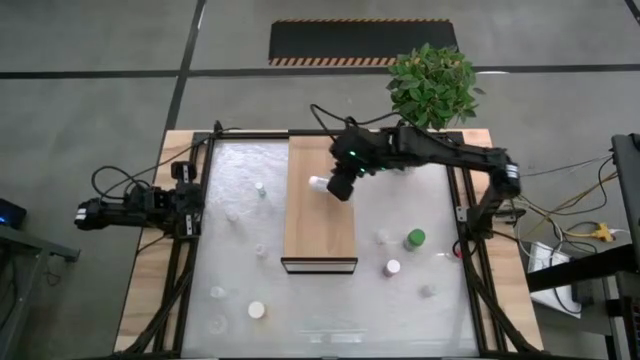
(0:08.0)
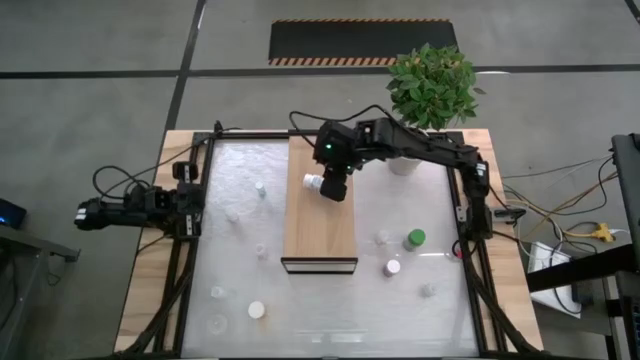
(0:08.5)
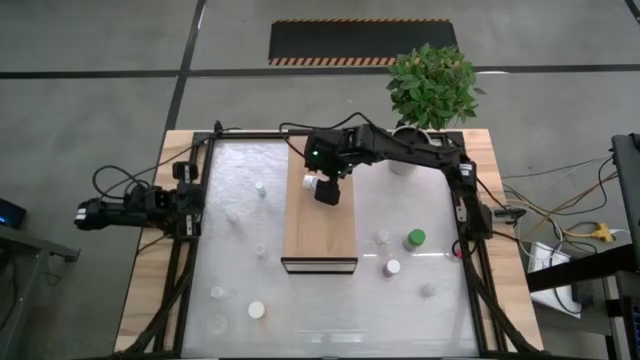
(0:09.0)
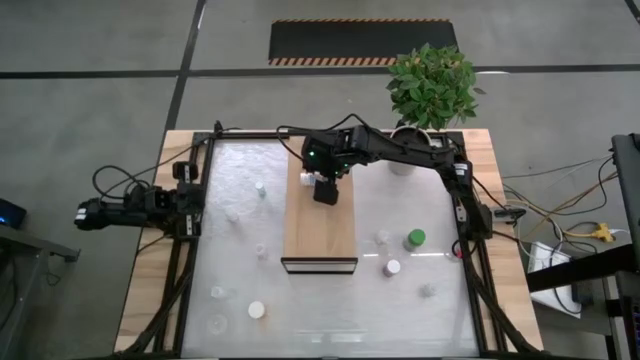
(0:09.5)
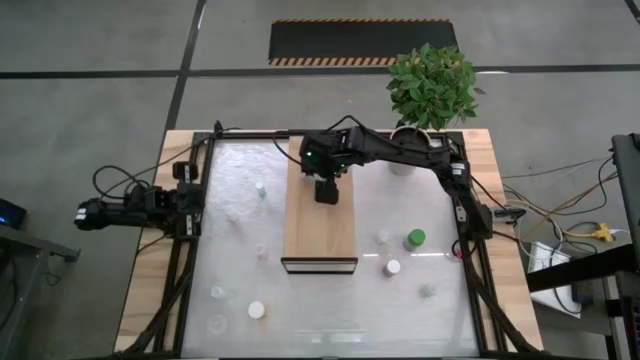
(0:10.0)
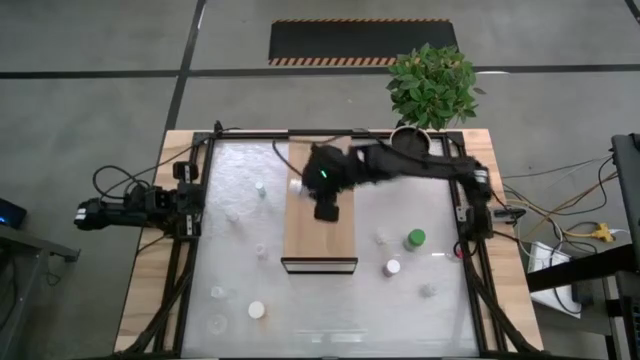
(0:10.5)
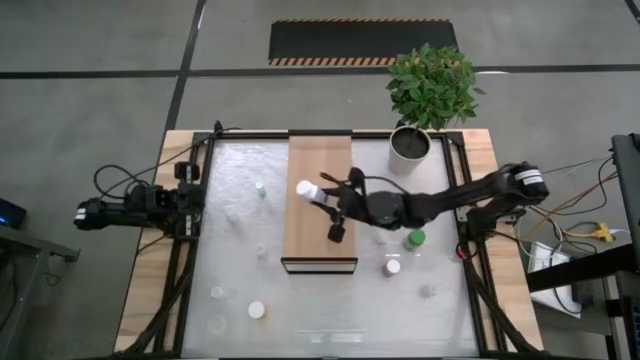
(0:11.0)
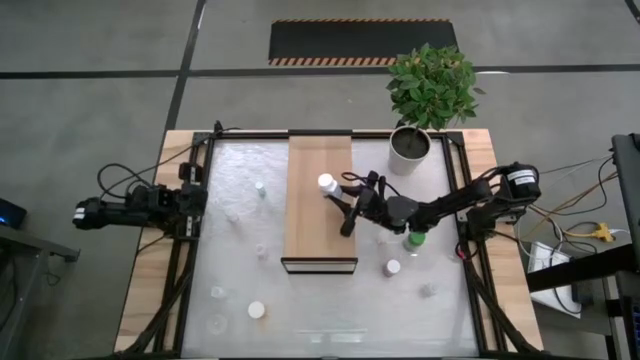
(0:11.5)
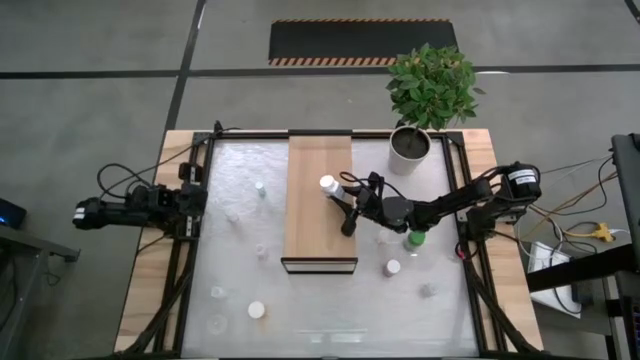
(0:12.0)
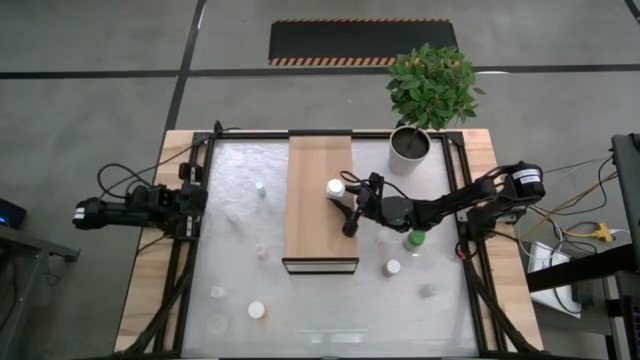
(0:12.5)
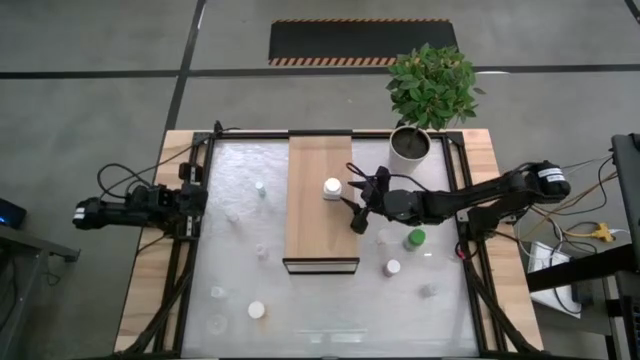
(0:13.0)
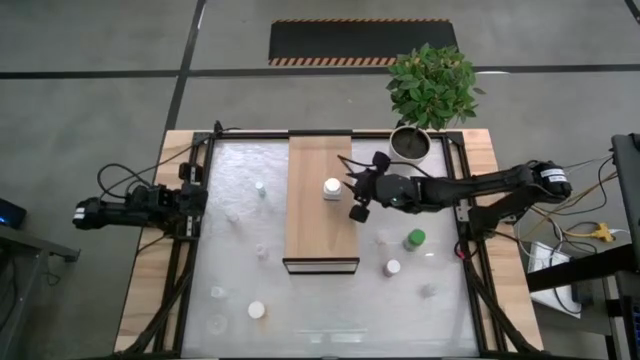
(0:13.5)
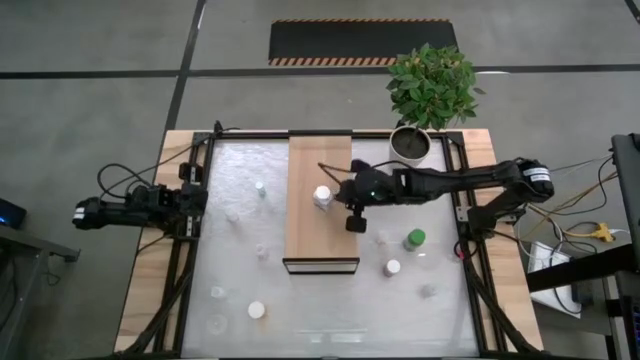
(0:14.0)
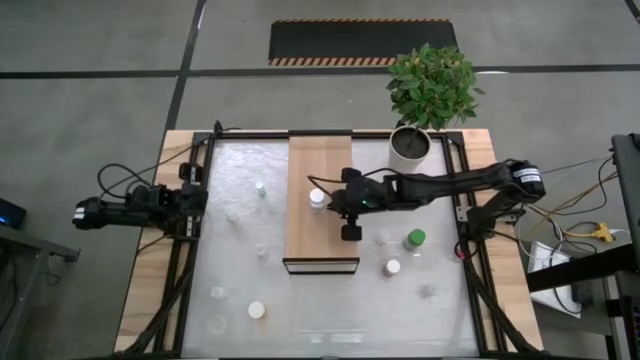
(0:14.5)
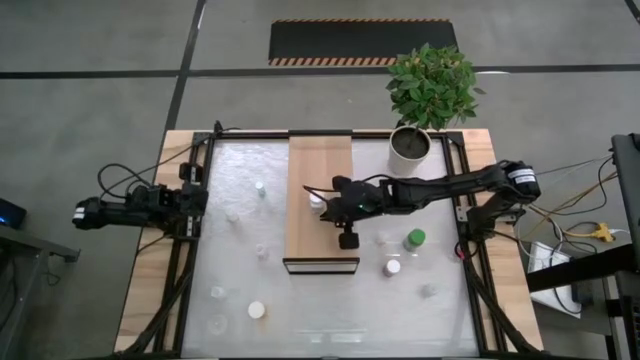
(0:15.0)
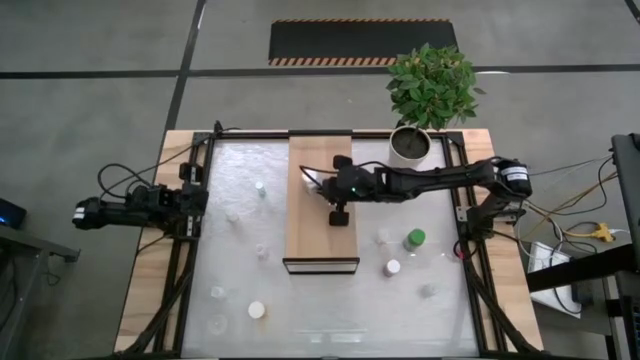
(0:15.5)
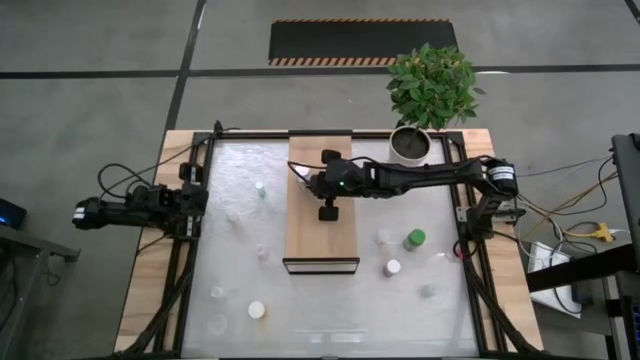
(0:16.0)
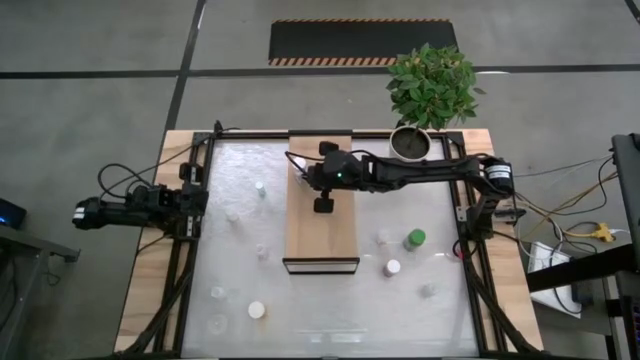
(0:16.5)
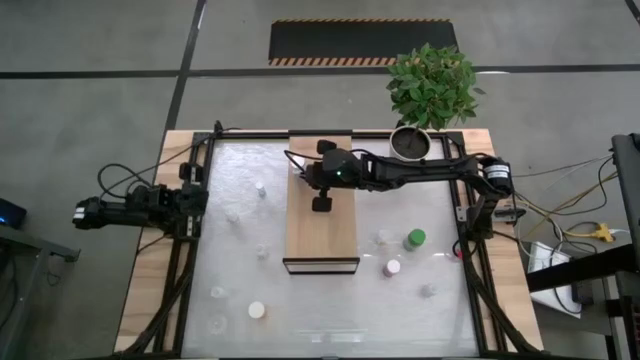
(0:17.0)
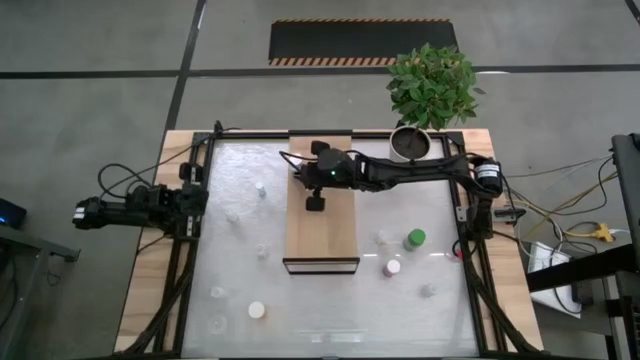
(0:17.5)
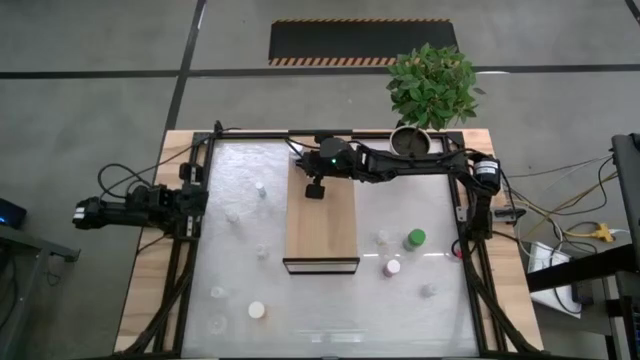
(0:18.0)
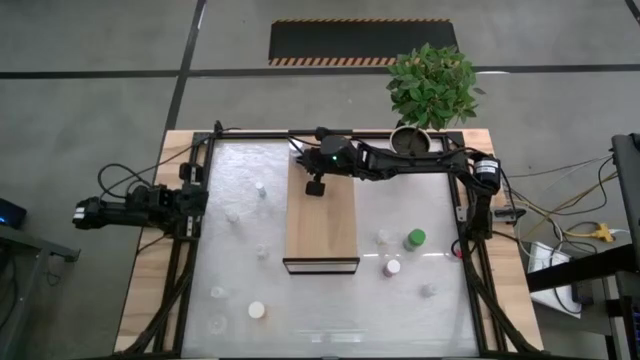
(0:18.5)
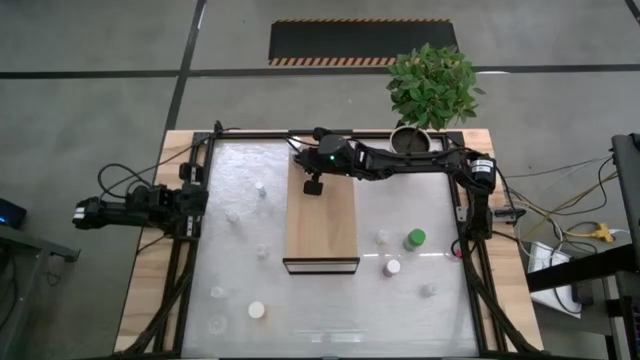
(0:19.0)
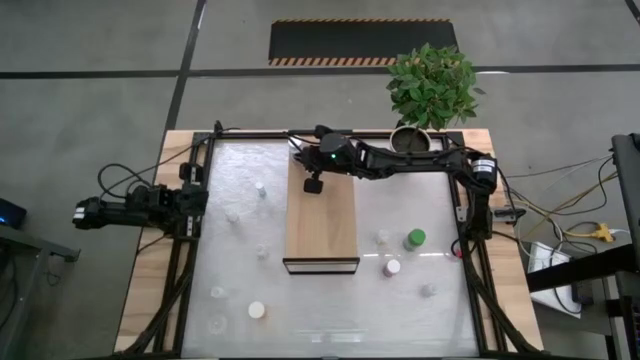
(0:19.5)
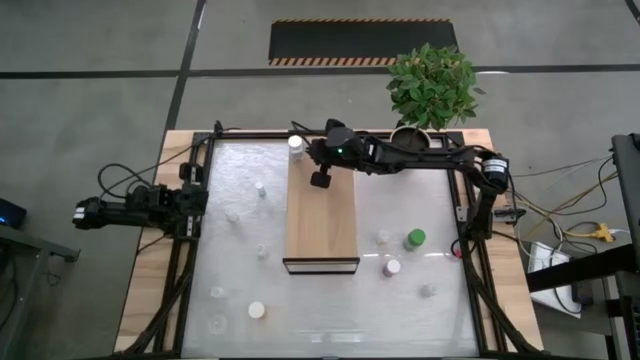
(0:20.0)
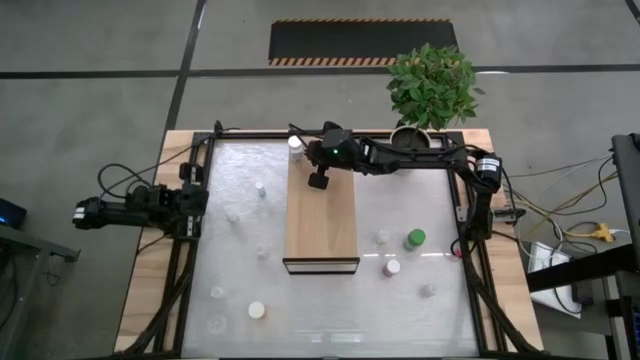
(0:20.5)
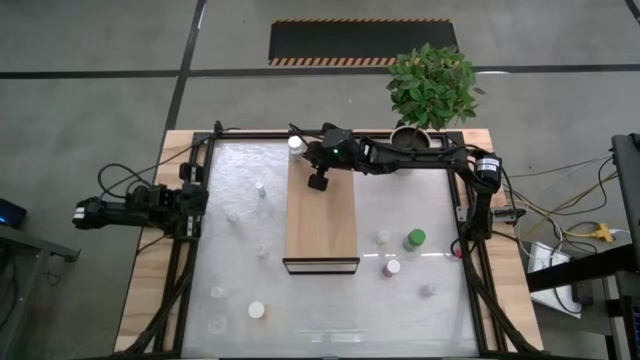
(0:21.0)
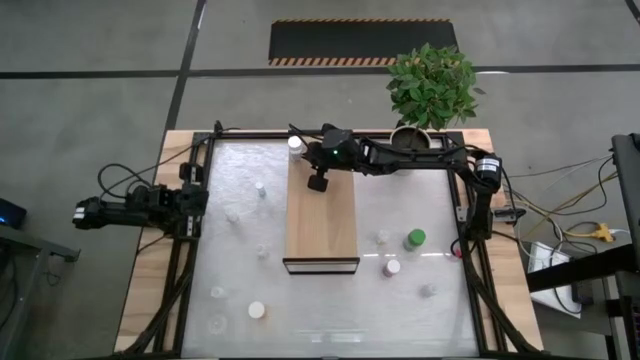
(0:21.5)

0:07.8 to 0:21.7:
Task: Pick and place medicine bottles onto shelf by color
Put the blue pill bottle on the shelf

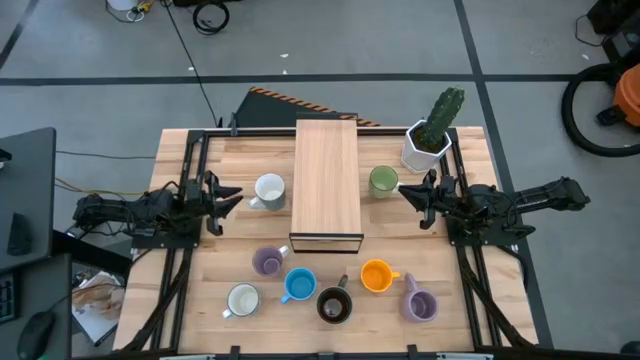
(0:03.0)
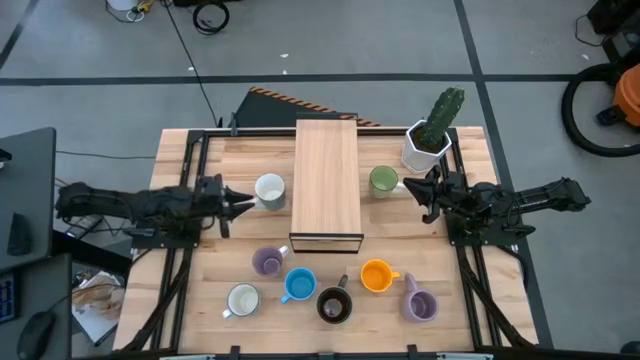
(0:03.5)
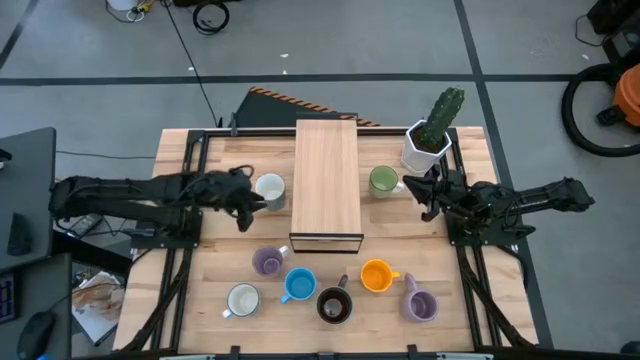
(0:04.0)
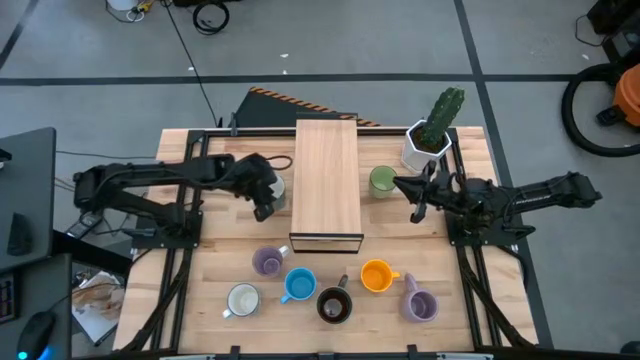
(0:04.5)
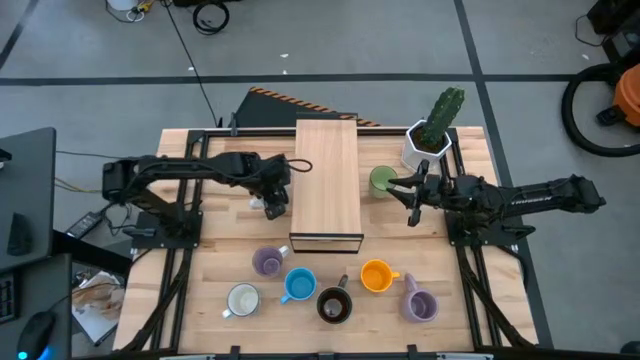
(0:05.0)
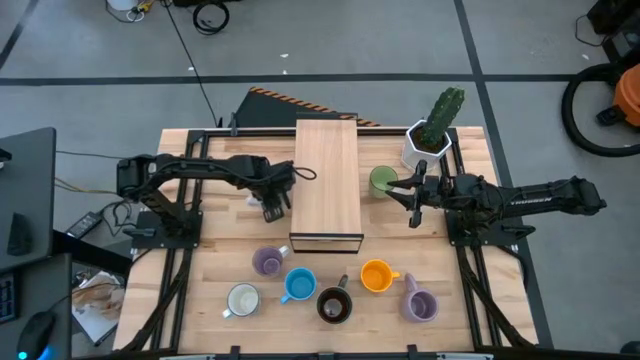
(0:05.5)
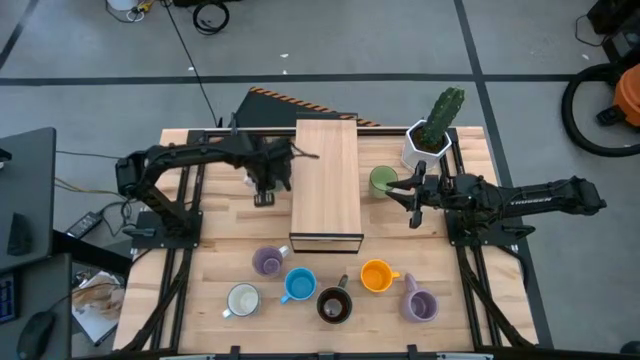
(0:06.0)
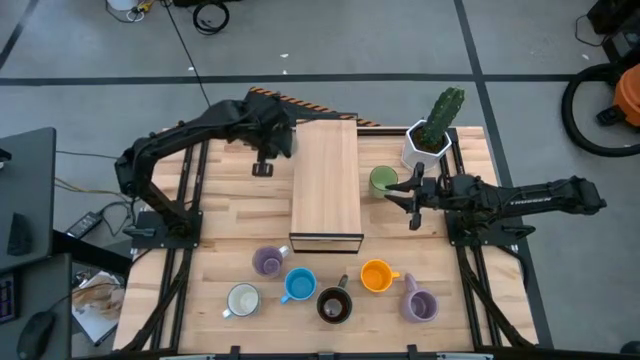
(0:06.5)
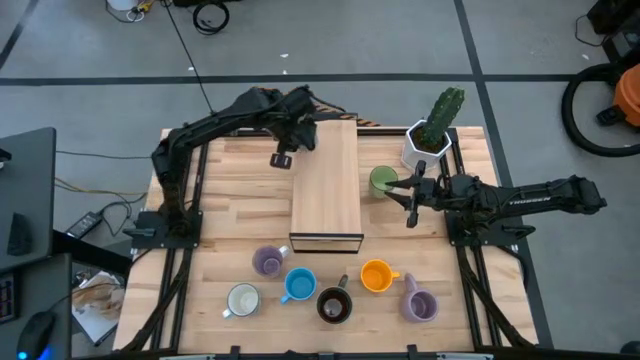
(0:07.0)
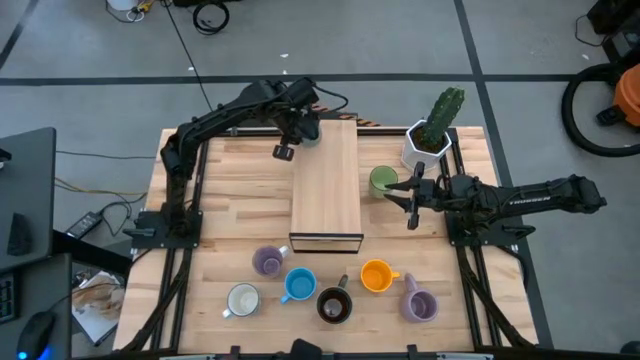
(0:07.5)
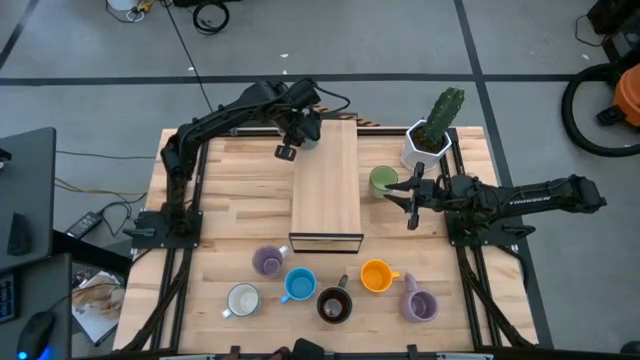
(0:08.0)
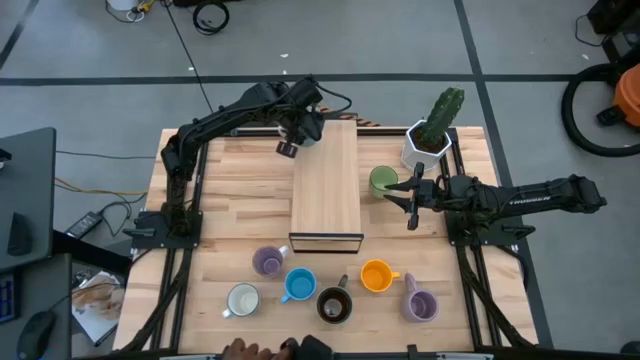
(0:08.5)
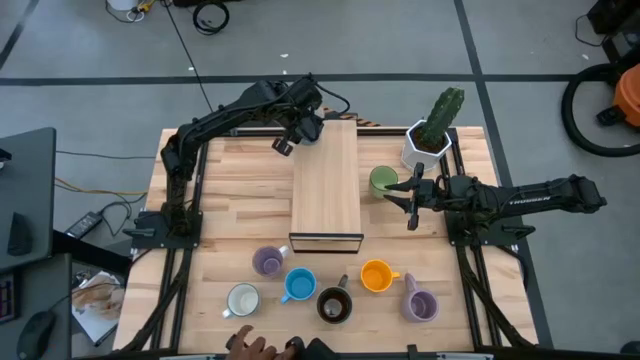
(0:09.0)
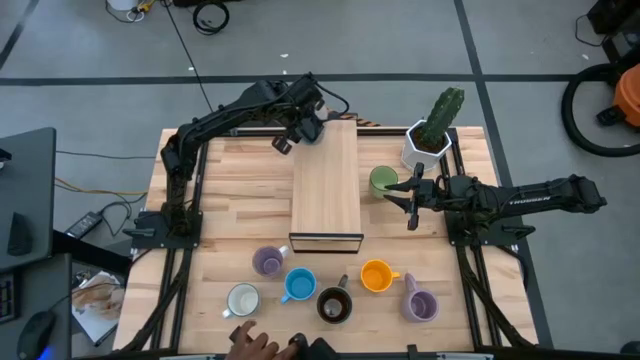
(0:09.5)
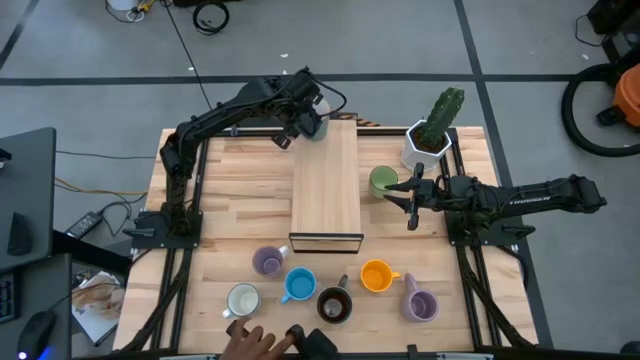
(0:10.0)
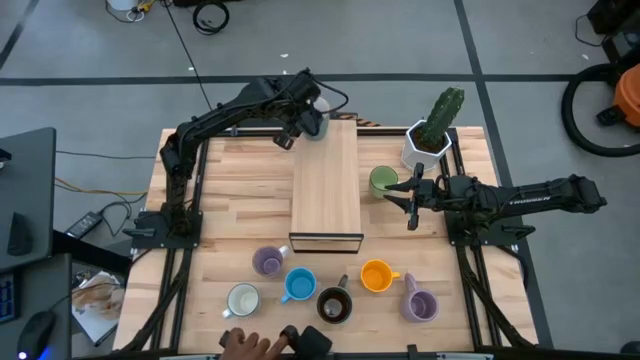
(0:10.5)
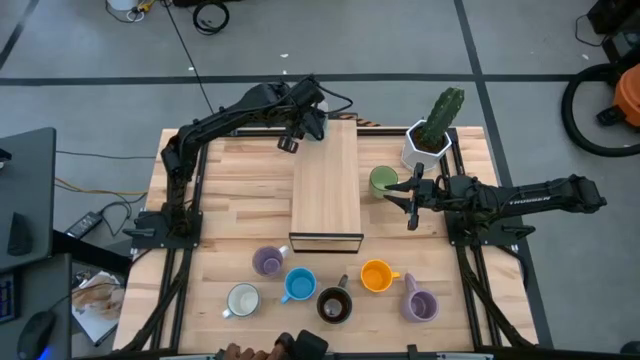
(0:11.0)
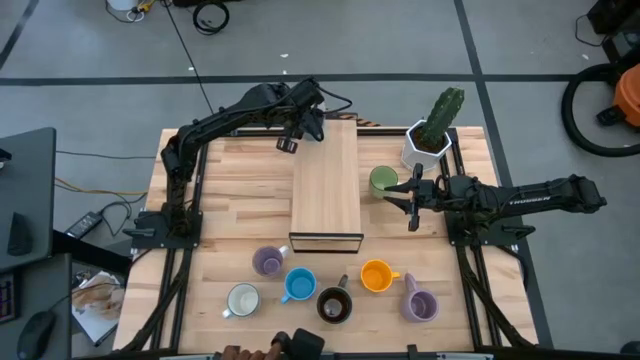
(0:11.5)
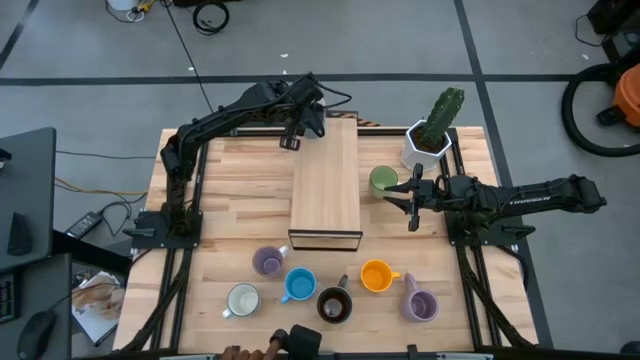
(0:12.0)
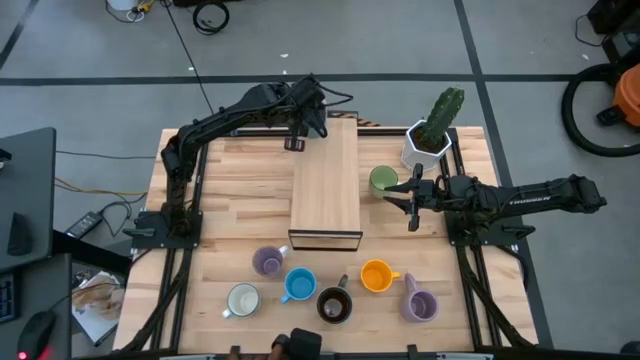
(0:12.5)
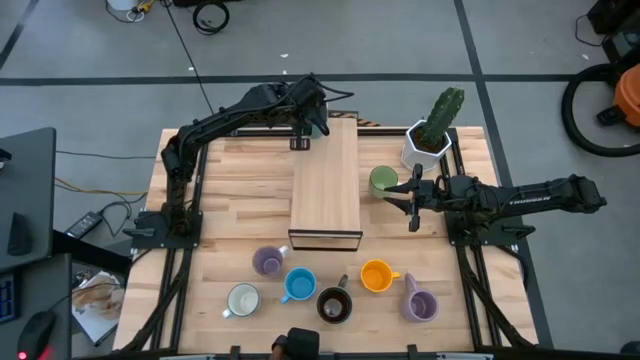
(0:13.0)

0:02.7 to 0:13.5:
Task: Place coffee mugs
Put the blue mug on the shelf
